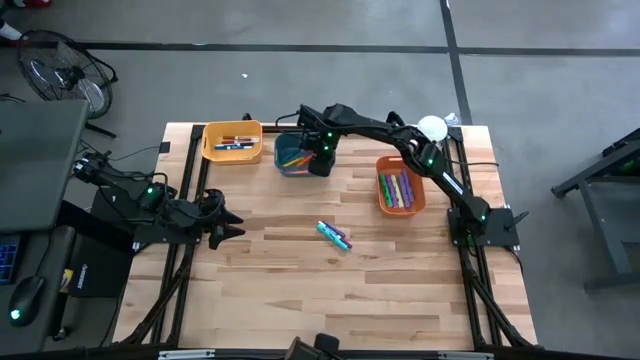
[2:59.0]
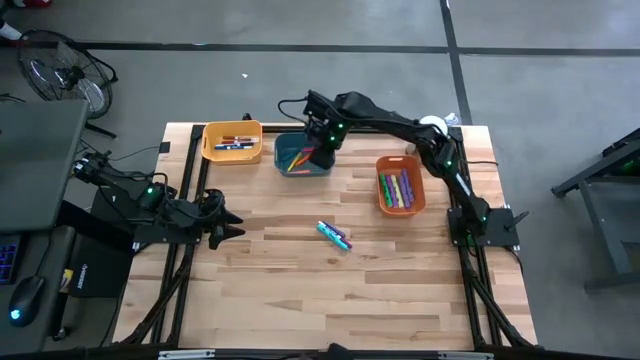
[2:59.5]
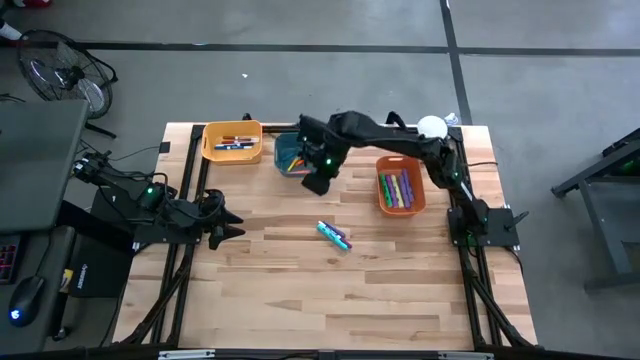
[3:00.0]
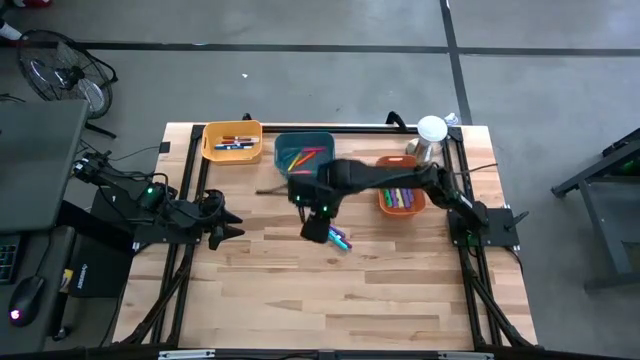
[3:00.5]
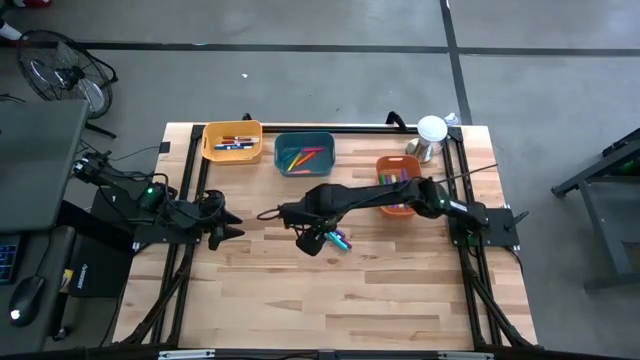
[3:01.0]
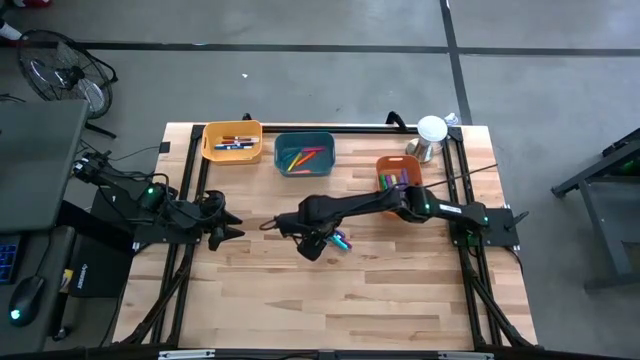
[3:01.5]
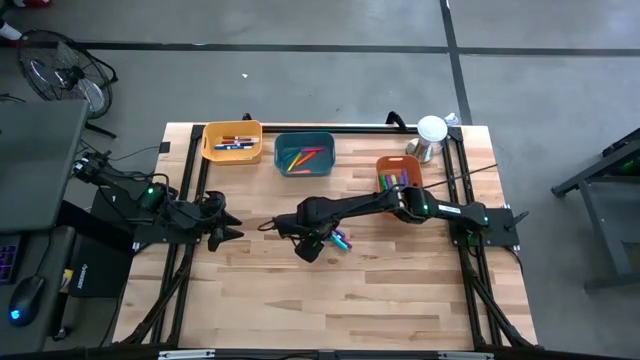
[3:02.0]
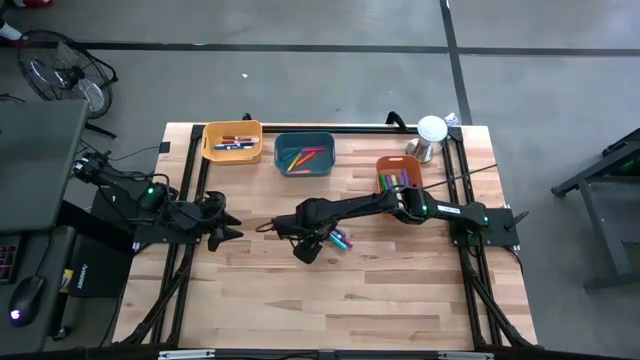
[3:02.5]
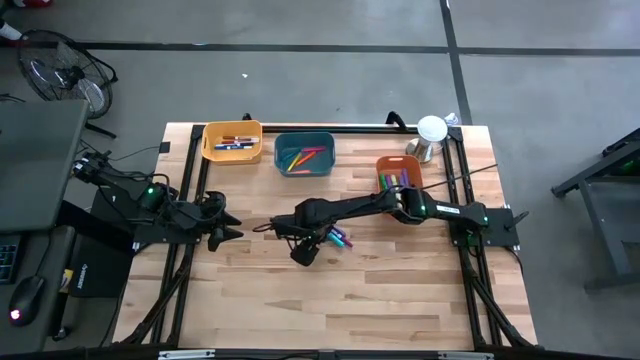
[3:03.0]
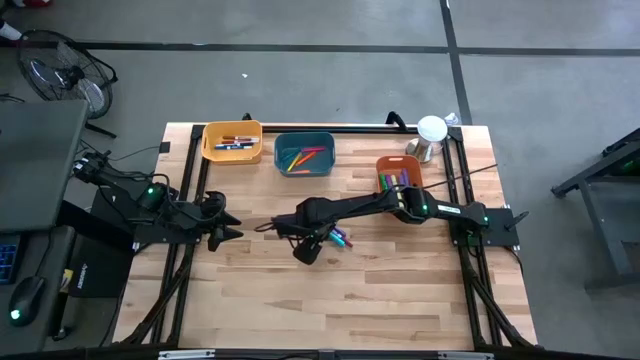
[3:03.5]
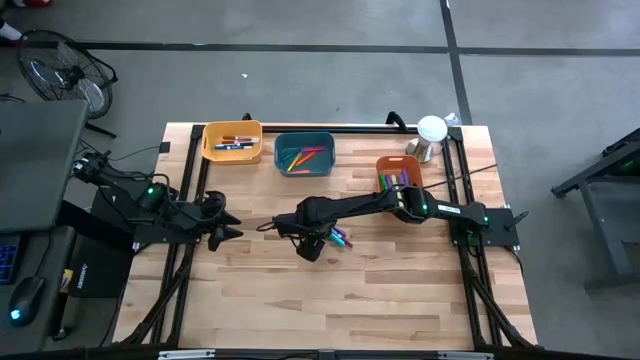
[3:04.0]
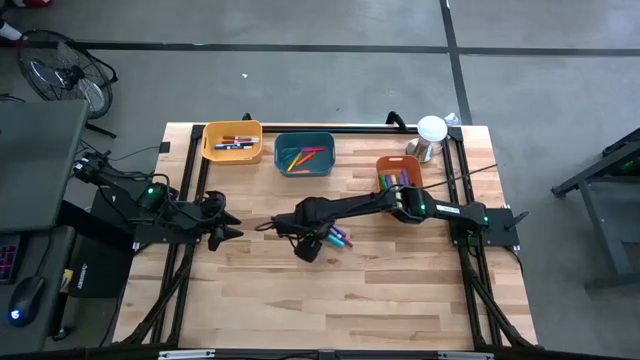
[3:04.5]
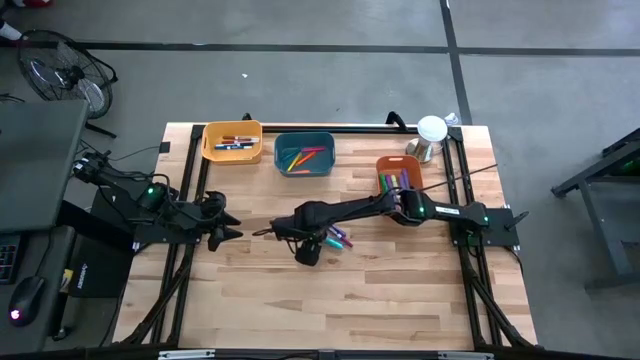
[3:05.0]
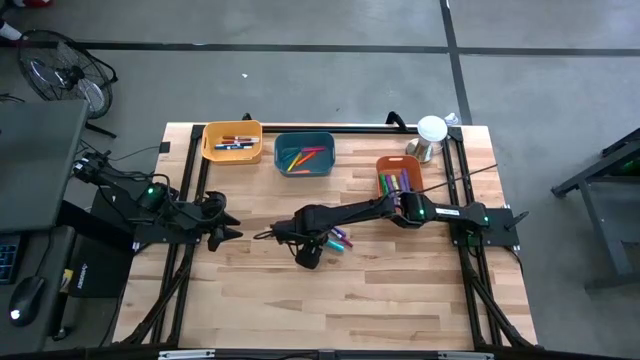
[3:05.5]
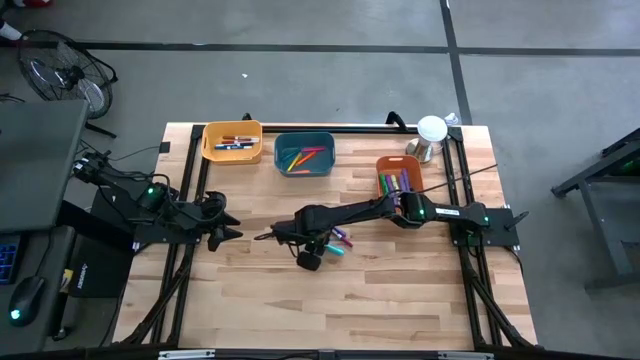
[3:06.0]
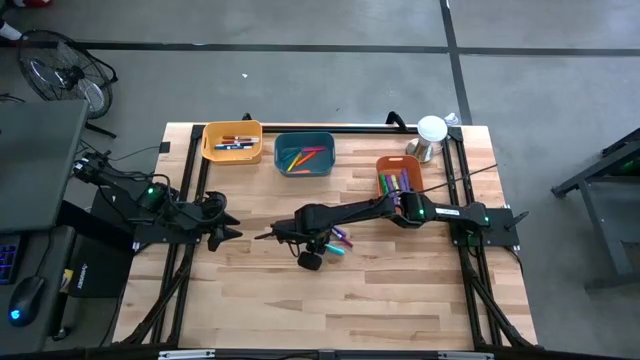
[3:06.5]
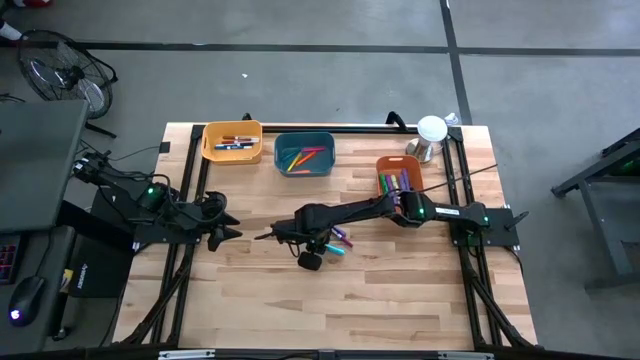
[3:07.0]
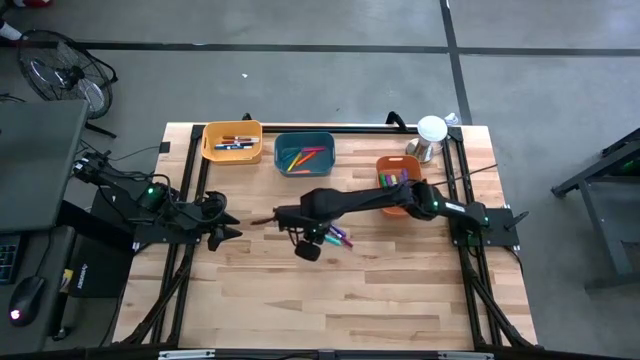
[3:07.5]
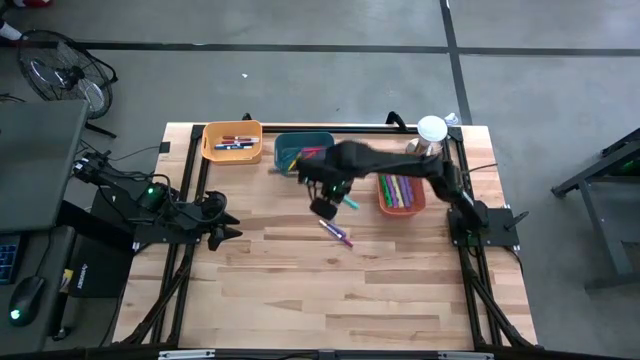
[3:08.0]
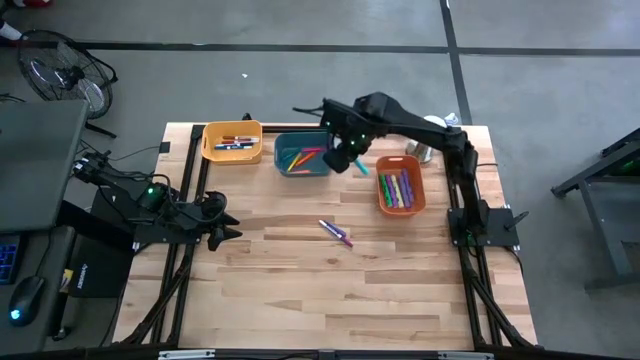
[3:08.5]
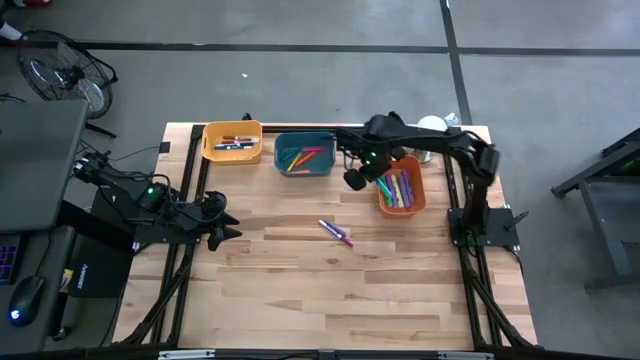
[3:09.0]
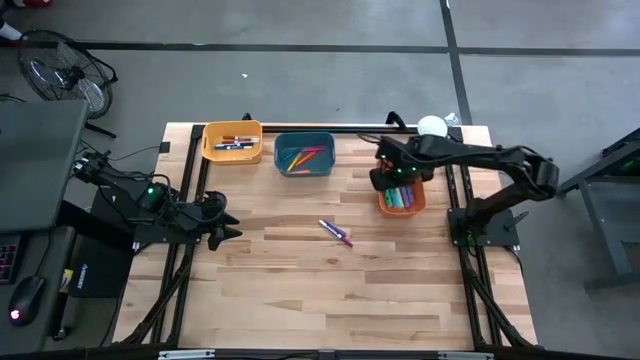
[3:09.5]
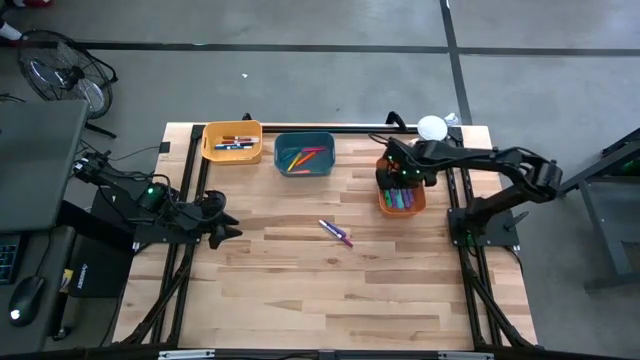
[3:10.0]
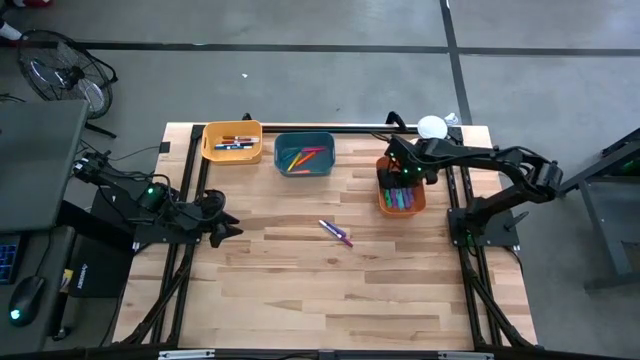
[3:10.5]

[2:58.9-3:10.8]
Task: Pick & Place Markers
Put the blue highlighter pen into the orange bin

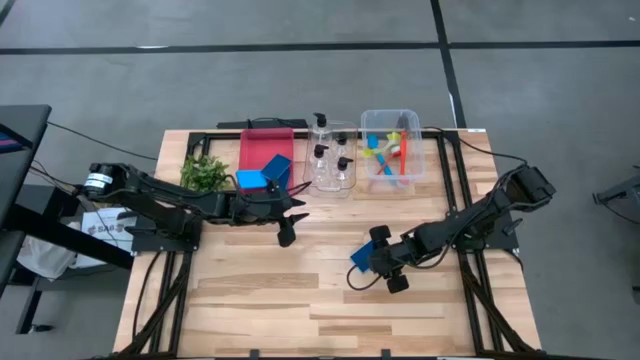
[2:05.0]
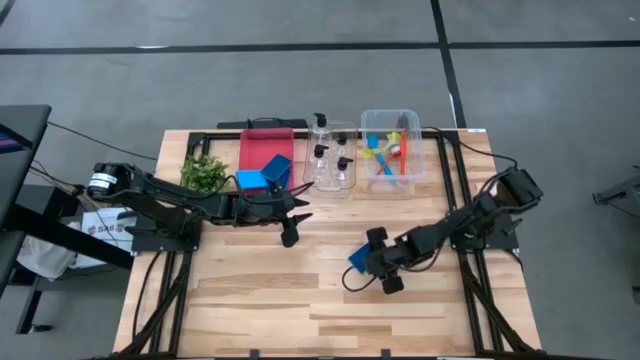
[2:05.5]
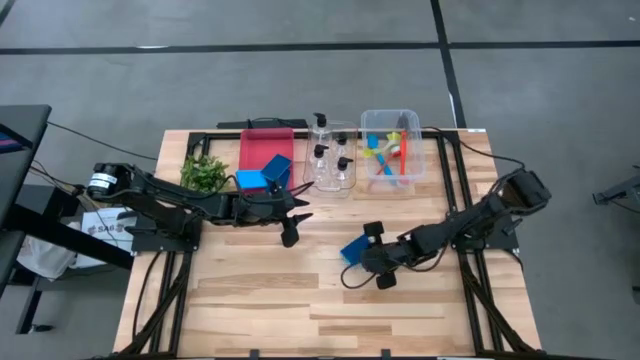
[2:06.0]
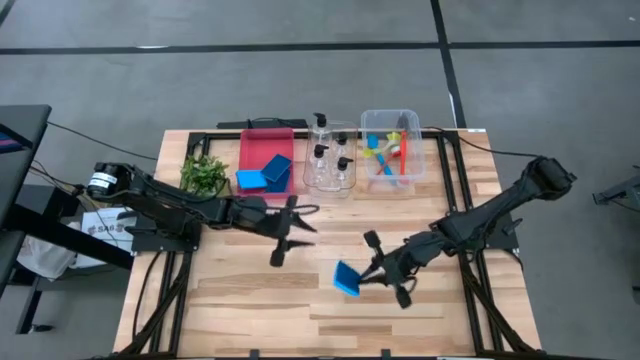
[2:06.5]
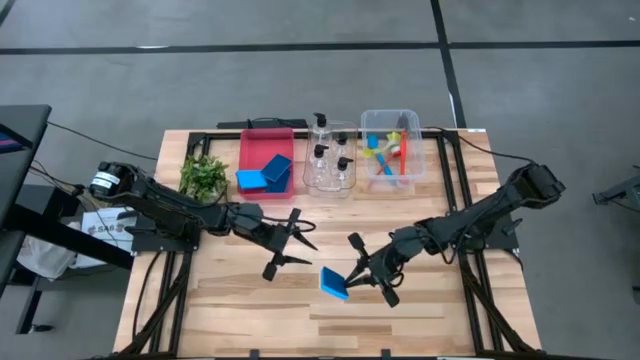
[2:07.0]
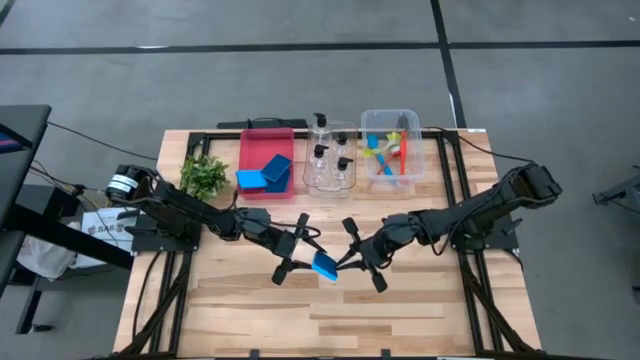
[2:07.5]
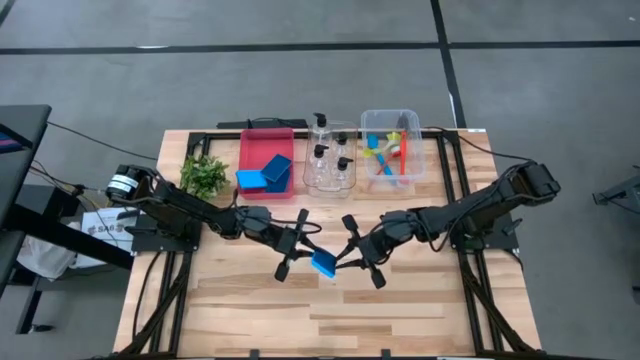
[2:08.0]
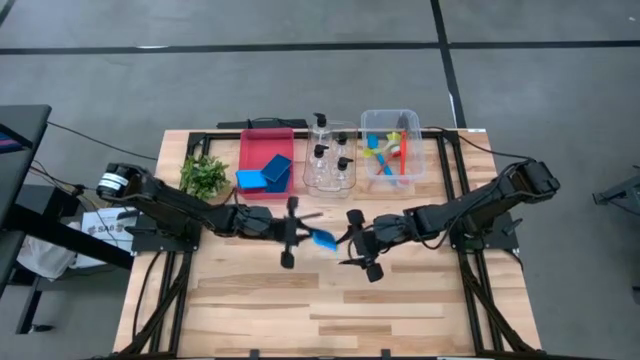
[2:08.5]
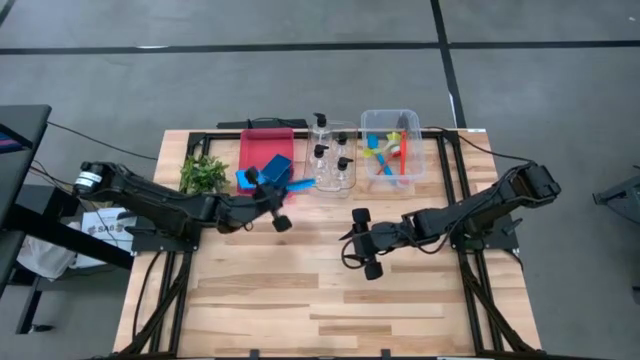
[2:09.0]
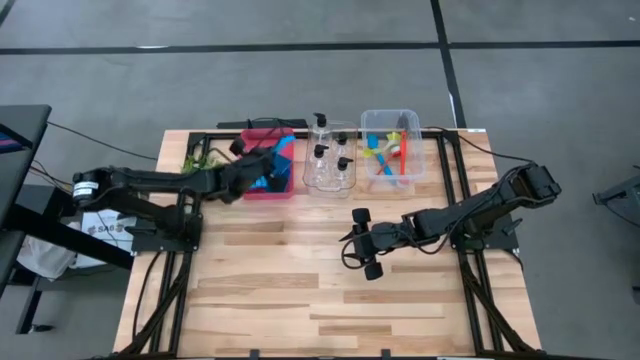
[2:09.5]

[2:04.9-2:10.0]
Task: Pick & Place Kitchen Sink Supplies
Put the blue sponge wipe into the red transparent bin

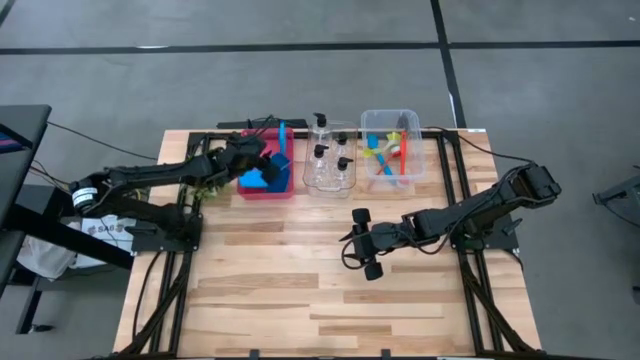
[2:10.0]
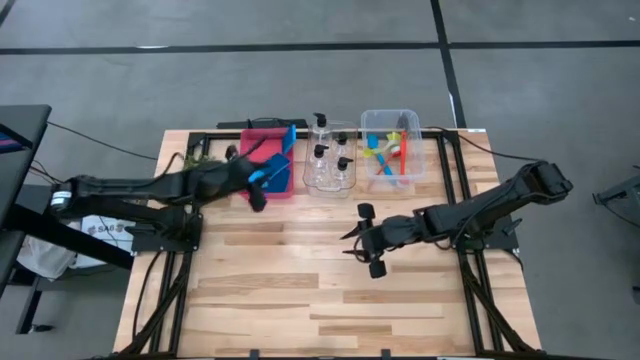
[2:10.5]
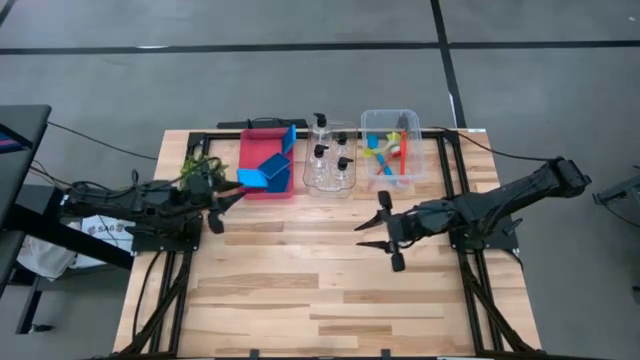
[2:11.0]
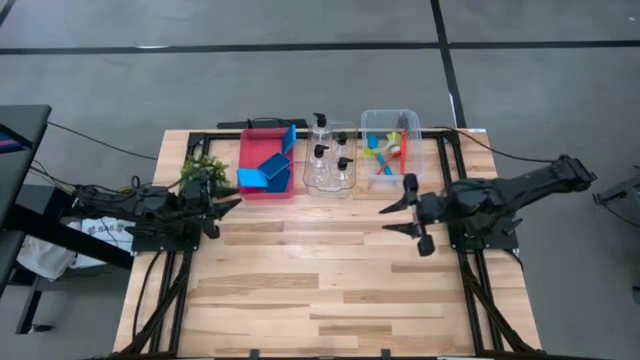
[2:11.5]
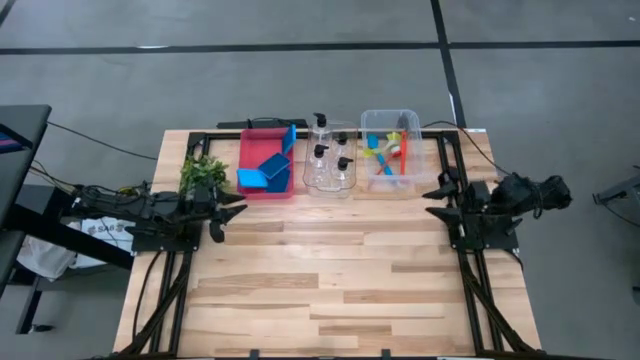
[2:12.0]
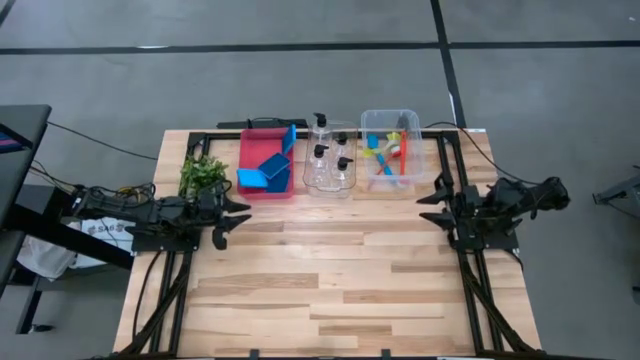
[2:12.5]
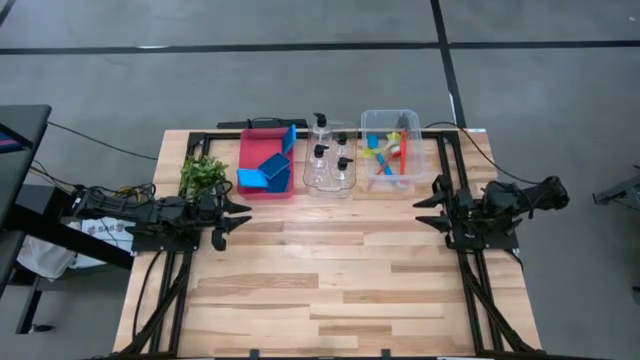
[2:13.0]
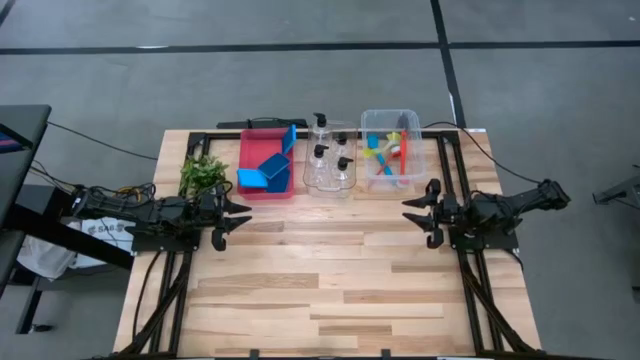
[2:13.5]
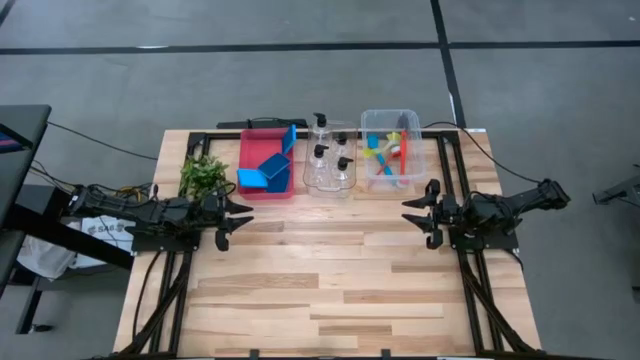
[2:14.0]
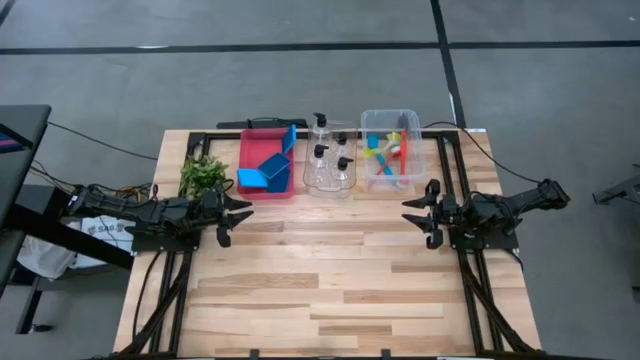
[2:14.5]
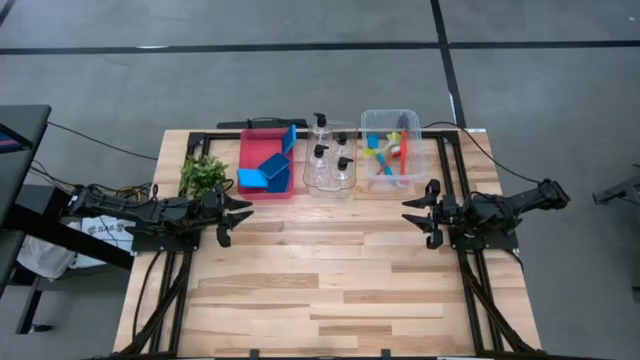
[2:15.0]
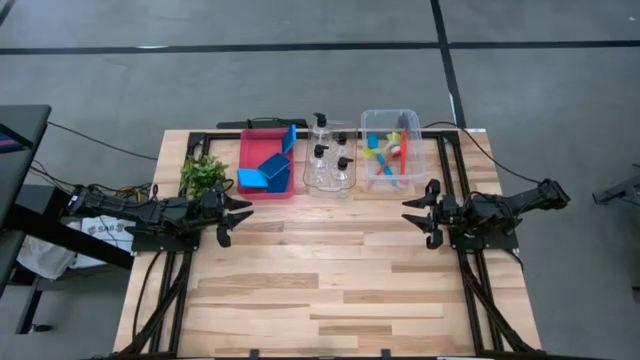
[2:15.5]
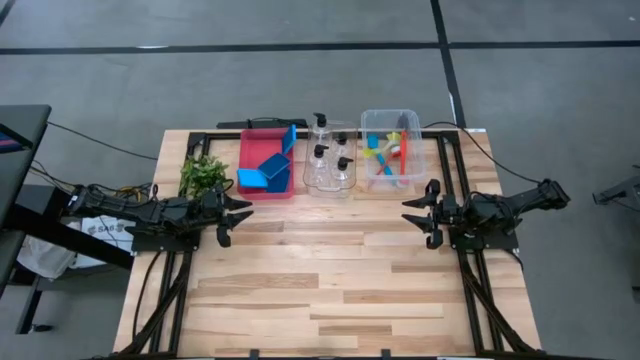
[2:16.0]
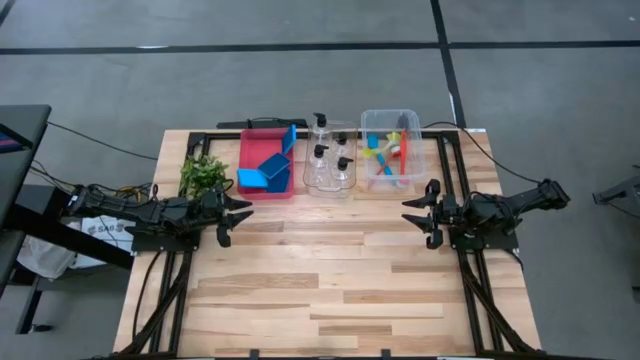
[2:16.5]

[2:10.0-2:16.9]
Return to Home Position
